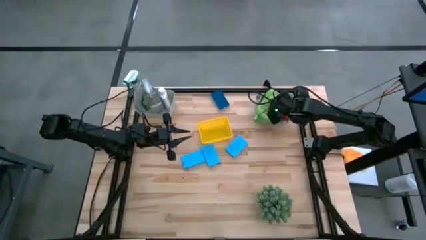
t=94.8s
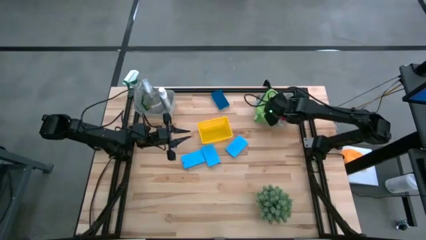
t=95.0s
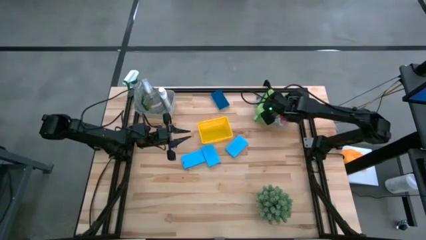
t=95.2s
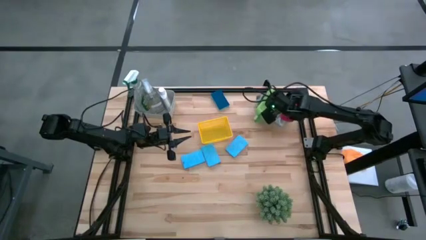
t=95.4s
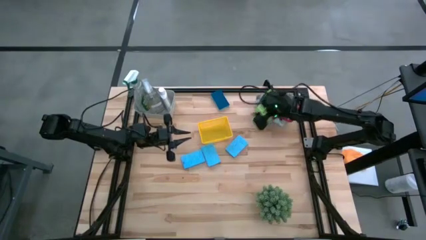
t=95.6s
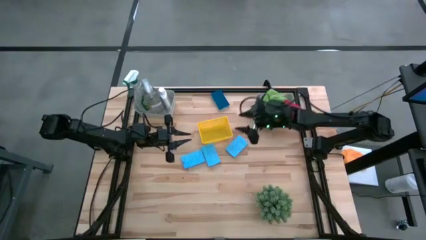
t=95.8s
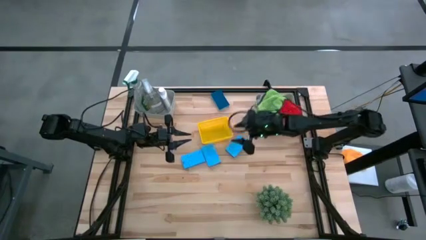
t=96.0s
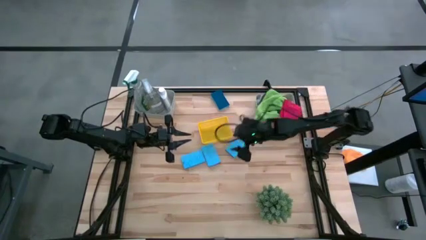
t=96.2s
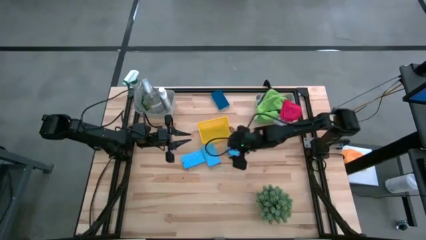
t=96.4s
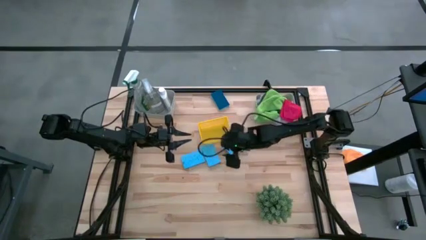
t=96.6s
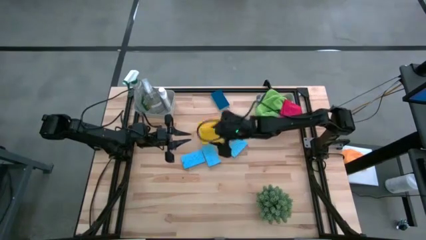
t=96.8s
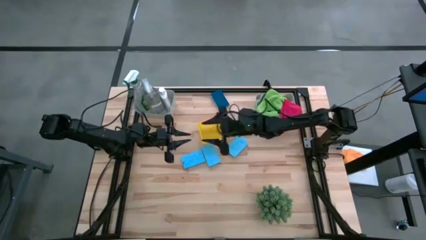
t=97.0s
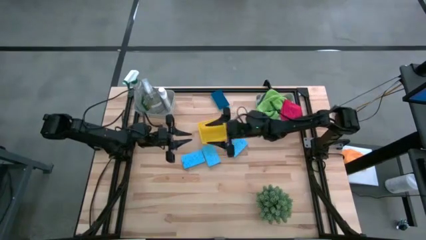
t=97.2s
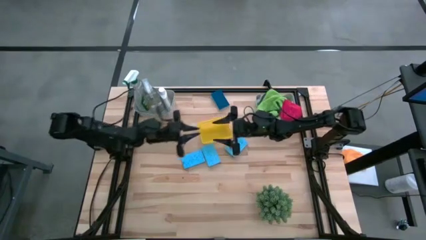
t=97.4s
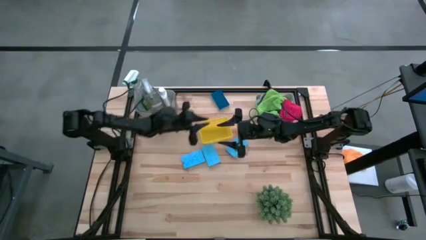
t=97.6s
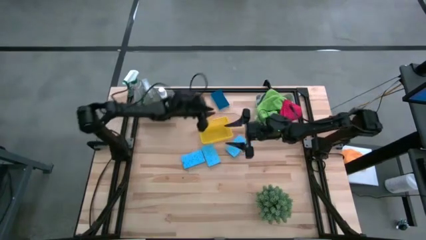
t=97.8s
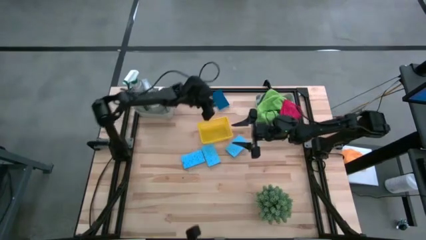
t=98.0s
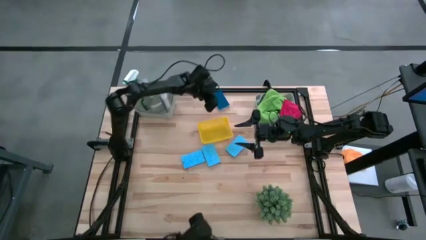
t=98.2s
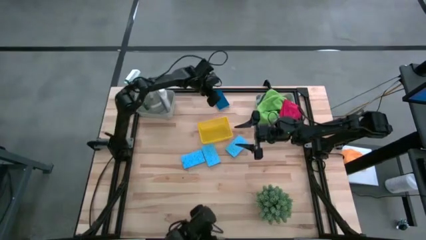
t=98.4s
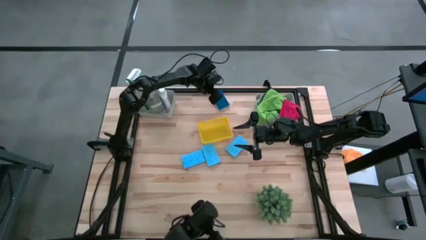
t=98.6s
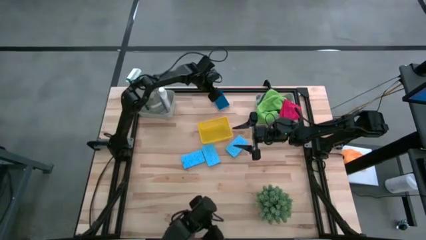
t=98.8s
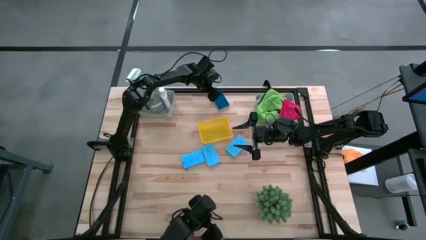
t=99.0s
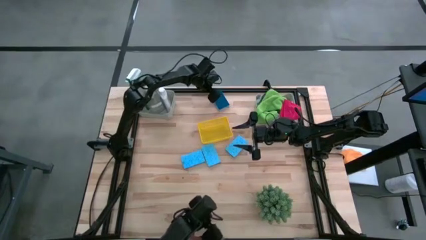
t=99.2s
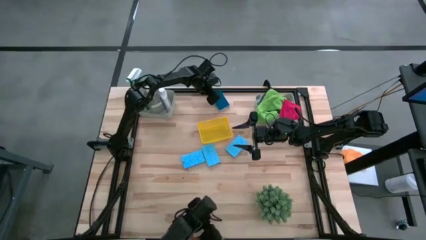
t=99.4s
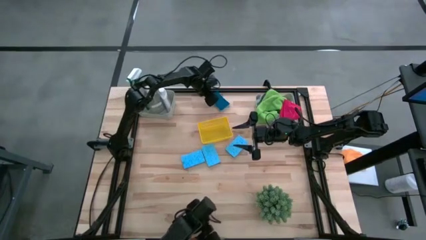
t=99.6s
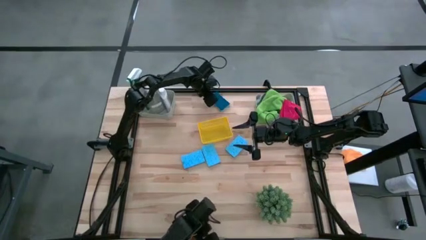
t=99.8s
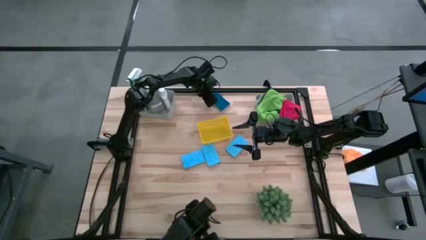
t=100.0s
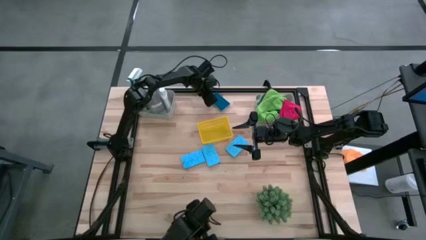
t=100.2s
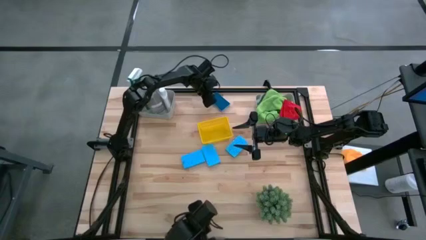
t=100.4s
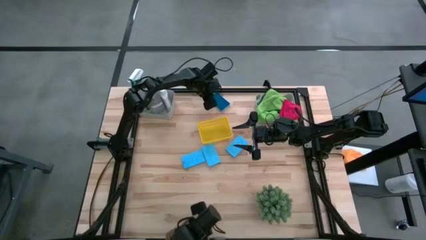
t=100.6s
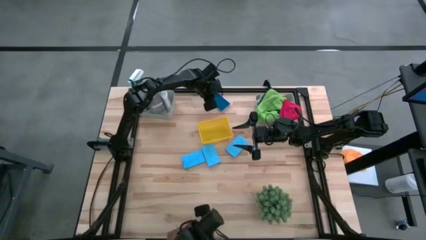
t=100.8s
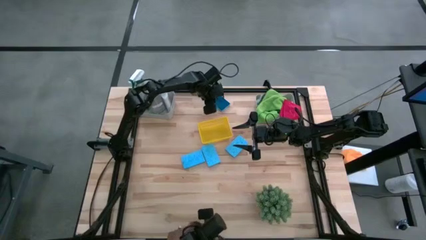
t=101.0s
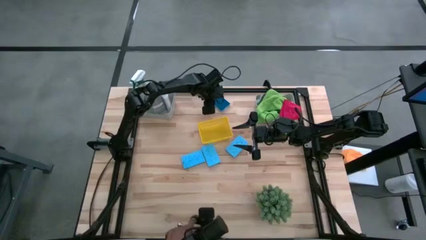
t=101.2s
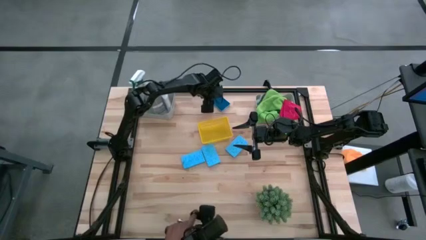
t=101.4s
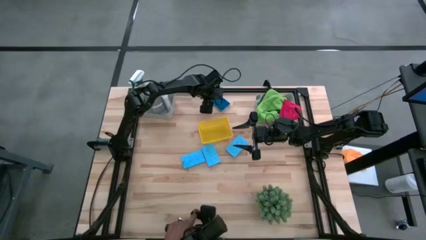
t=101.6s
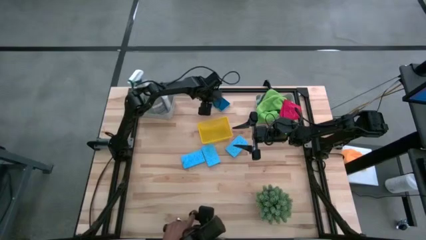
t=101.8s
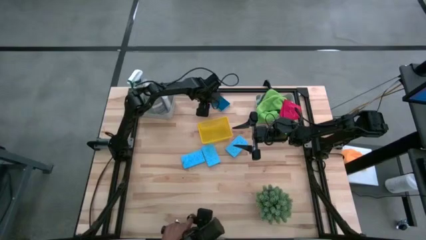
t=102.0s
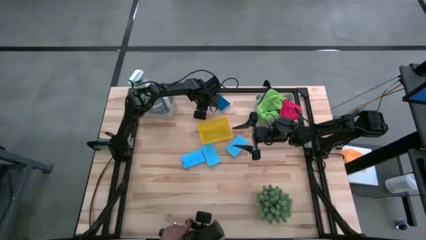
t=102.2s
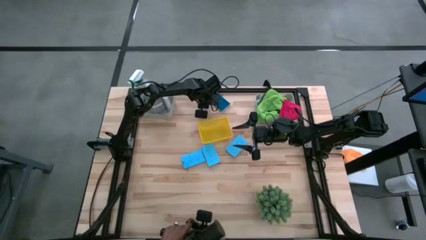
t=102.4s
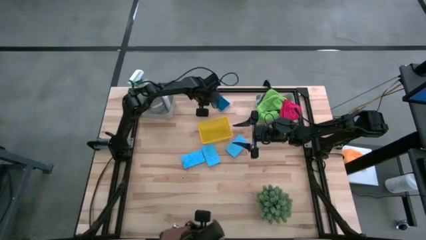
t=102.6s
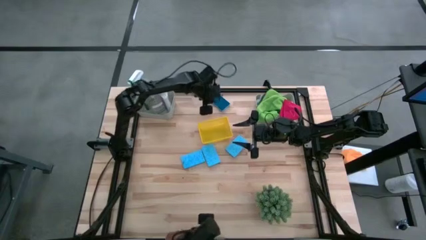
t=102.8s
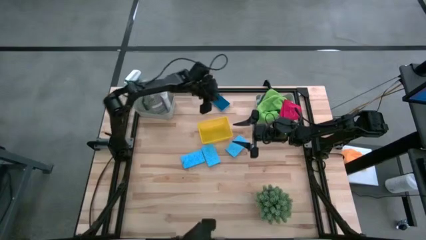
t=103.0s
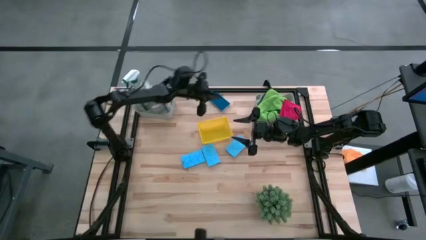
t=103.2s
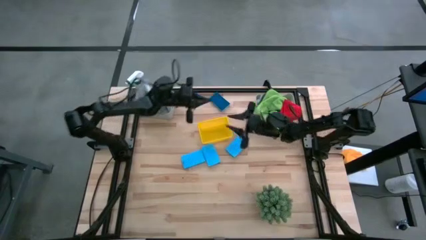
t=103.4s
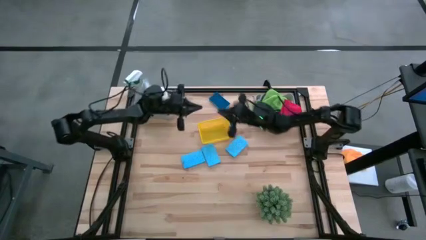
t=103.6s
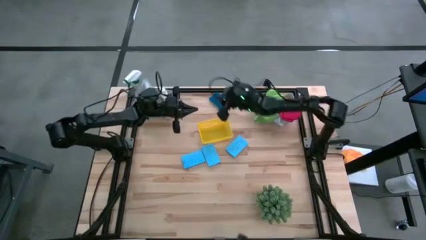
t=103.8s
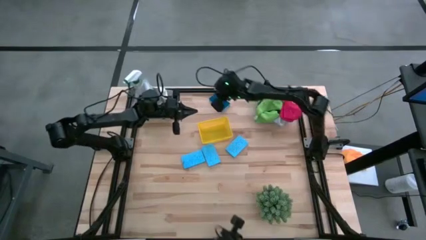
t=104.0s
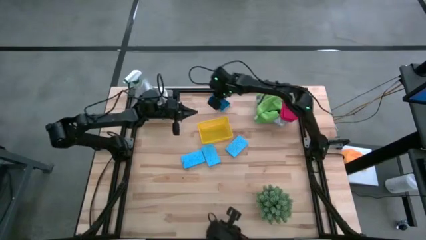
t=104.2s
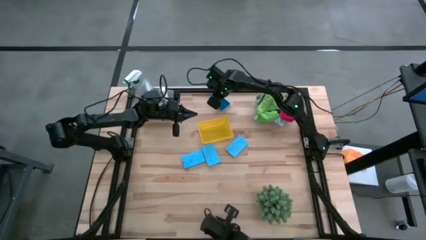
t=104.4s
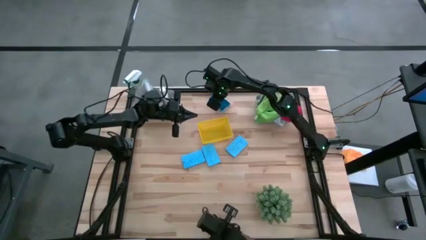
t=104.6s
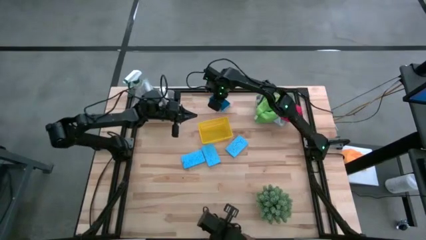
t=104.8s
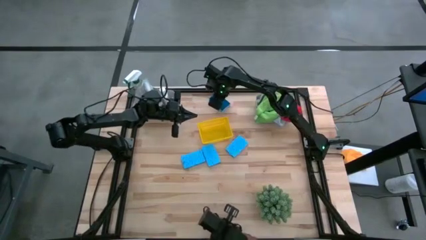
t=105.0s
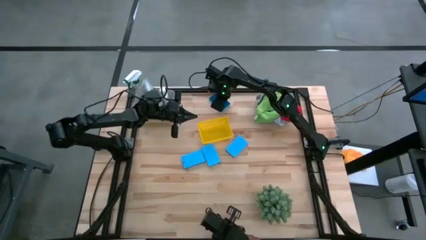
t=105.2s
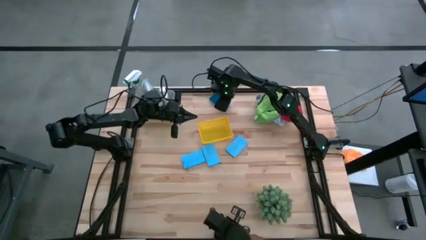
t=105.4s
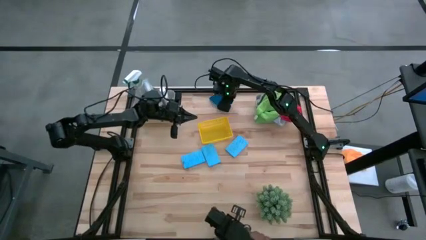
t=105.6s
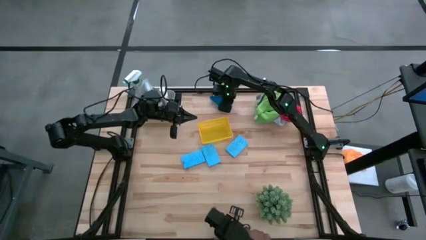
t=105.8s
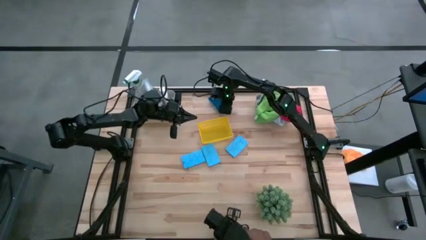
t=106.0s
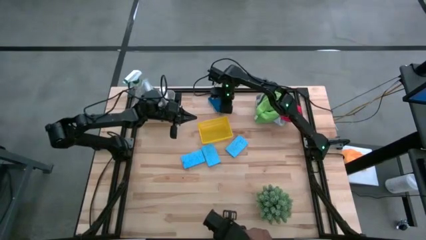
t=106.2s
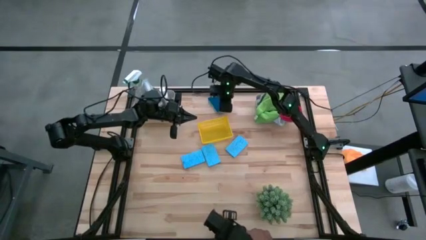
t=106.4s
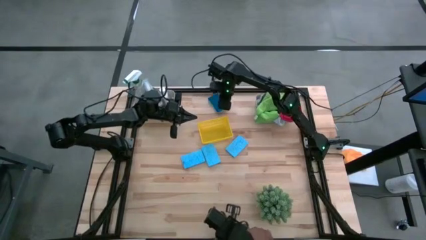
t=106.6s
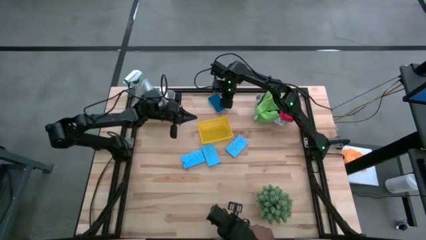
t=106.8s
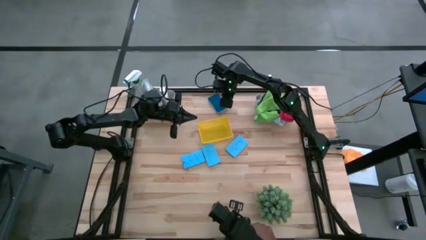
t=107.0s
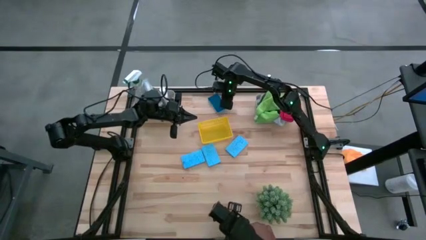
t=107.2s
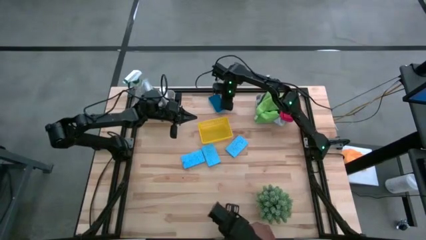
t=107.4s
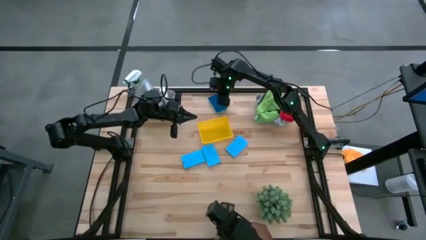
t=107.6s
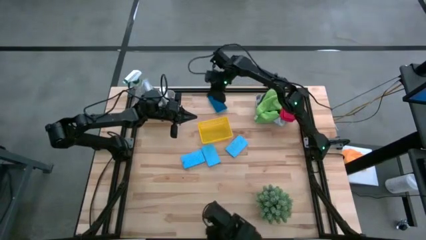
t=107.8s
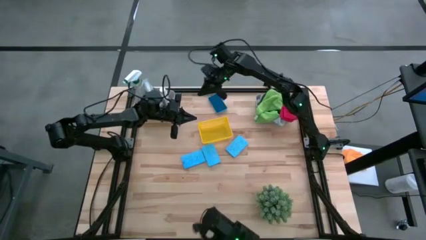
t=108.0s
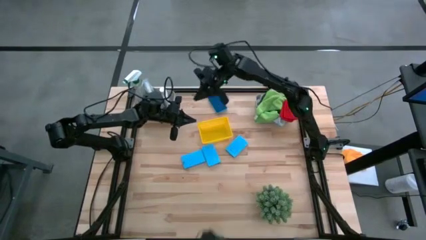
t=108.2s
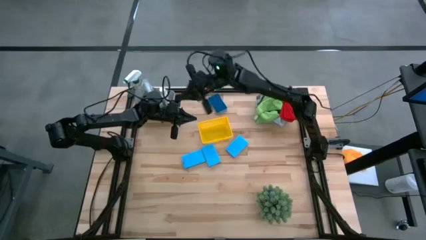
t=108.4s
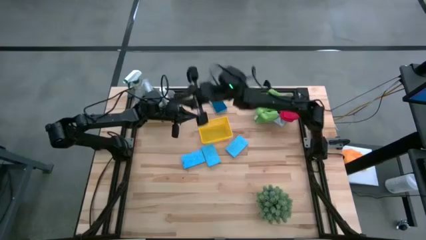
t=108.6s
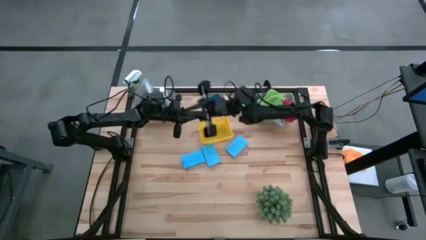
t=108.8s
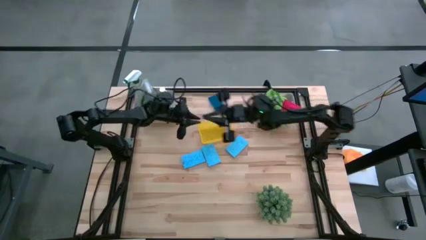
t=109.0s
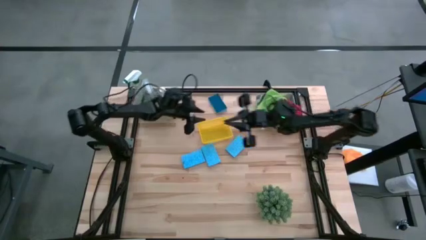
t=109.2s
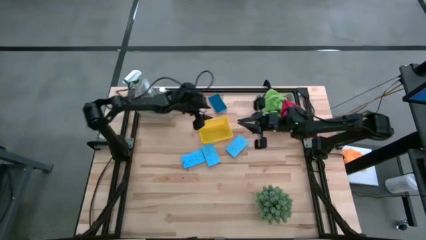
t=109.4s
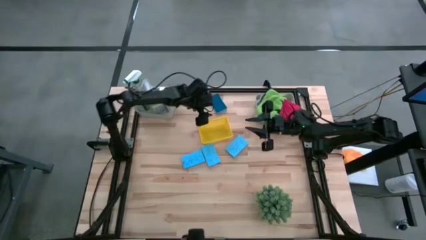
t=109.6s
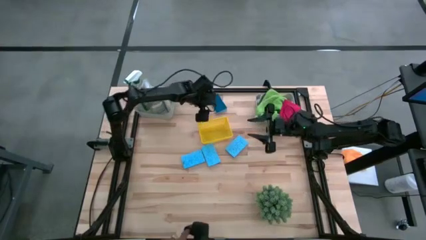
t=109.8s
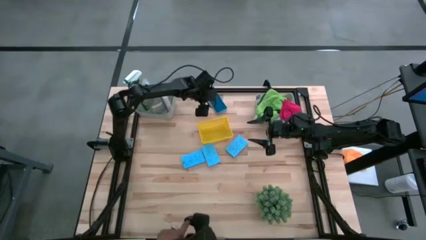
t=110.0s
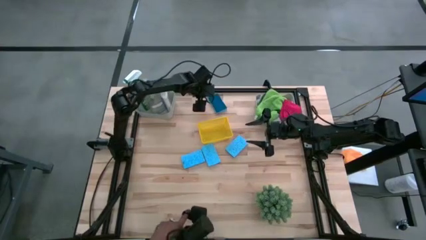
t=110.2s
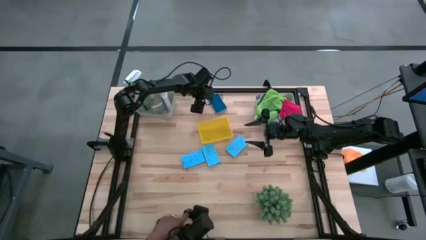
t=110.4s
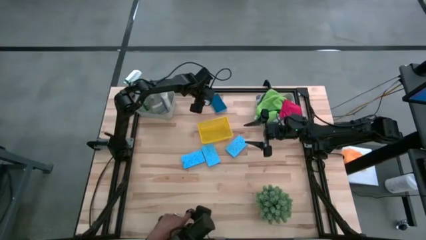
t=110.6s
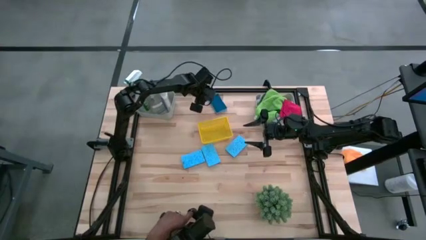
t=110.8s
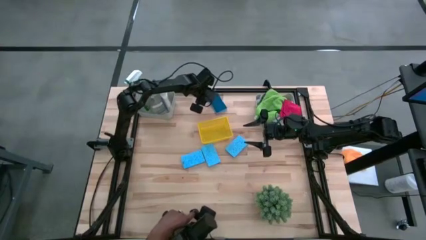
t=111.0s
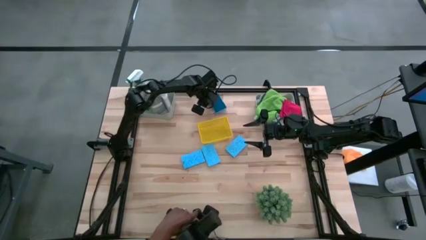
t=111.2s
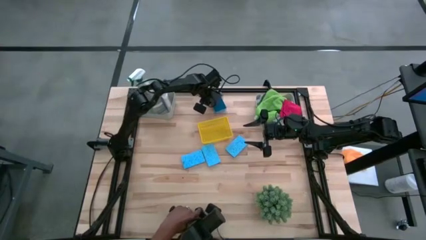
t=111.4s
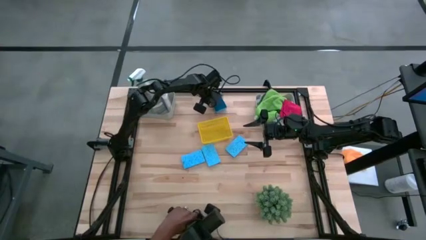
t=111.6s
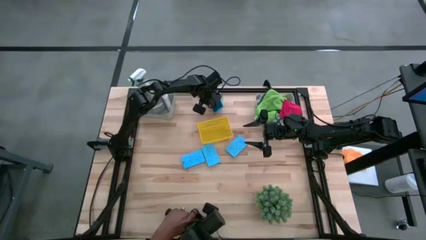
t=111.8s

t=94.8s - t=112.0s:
Task: Pick & Place Kitchen Items
Put the blue sponge into the yellow bin
